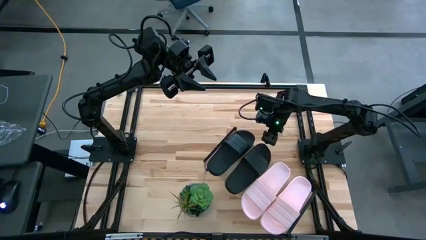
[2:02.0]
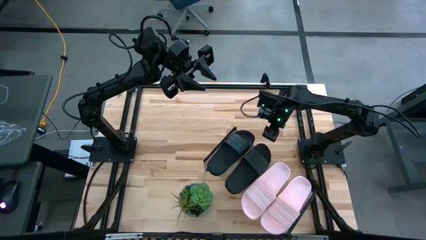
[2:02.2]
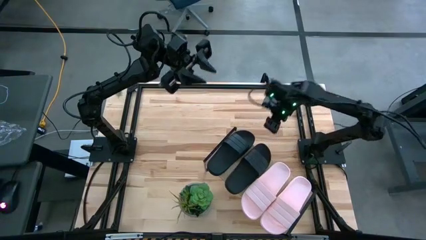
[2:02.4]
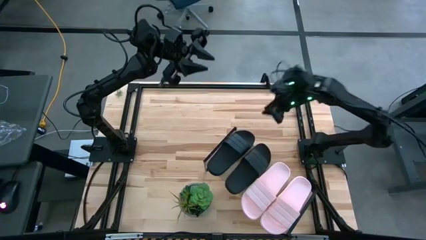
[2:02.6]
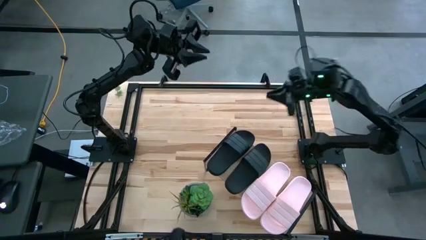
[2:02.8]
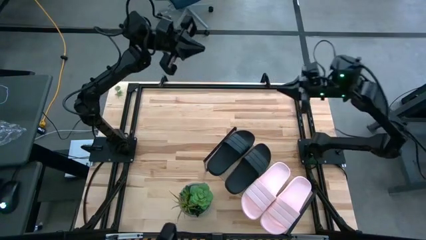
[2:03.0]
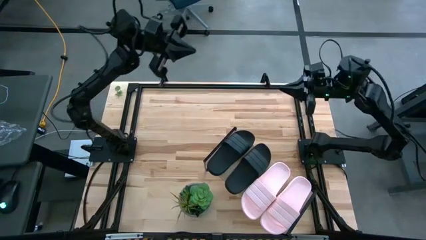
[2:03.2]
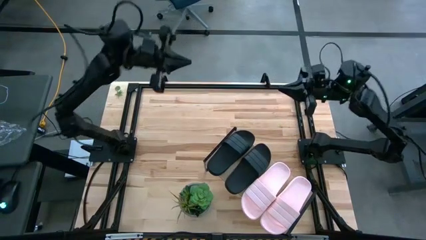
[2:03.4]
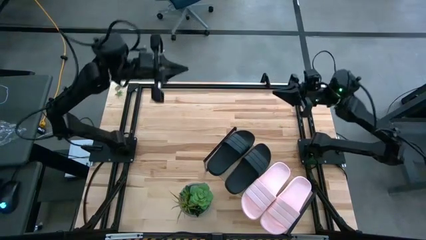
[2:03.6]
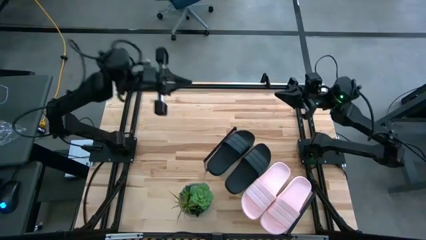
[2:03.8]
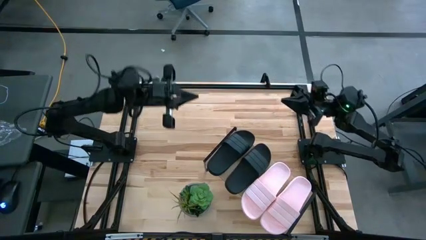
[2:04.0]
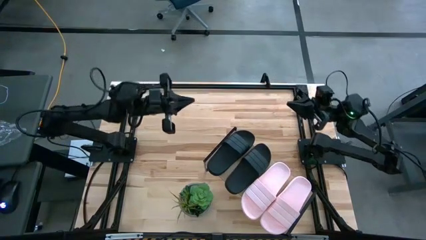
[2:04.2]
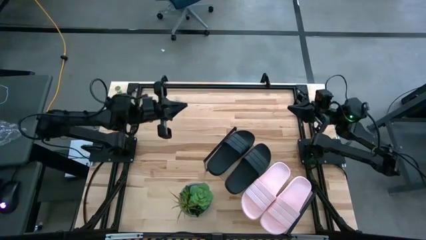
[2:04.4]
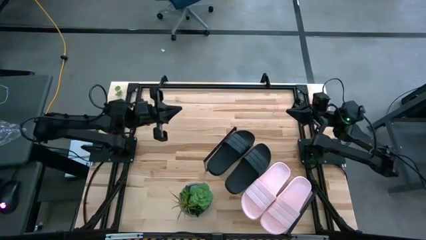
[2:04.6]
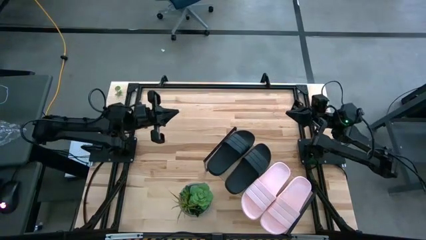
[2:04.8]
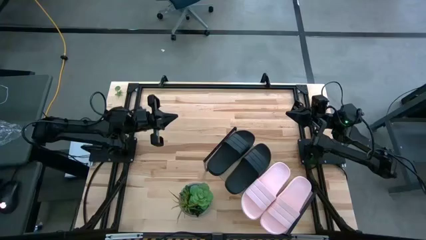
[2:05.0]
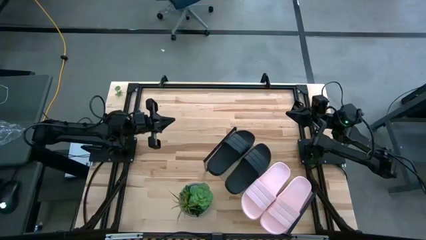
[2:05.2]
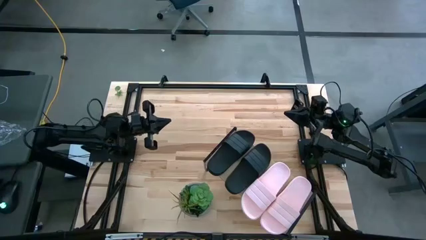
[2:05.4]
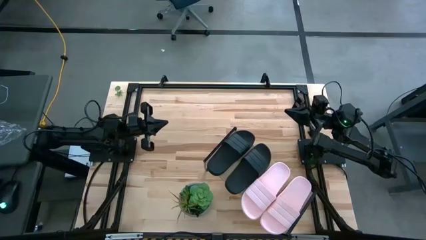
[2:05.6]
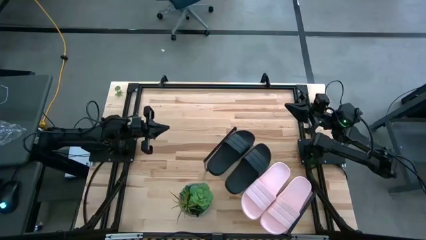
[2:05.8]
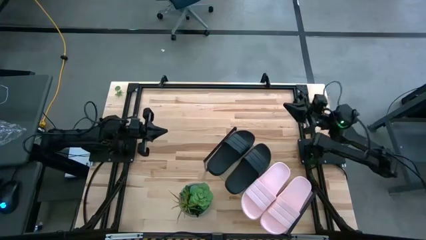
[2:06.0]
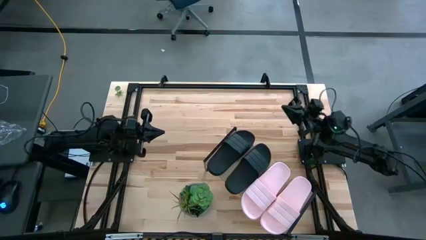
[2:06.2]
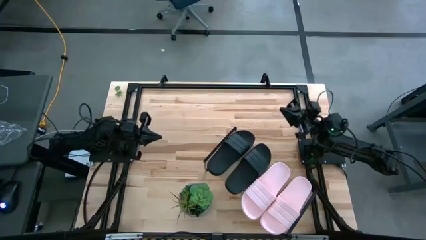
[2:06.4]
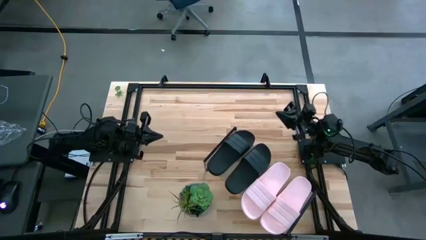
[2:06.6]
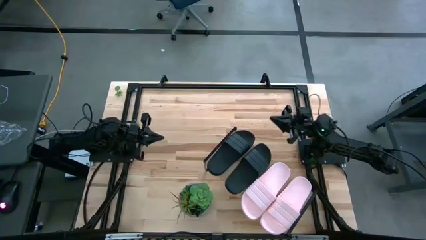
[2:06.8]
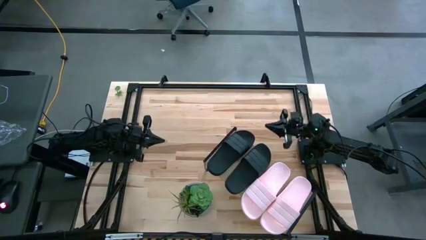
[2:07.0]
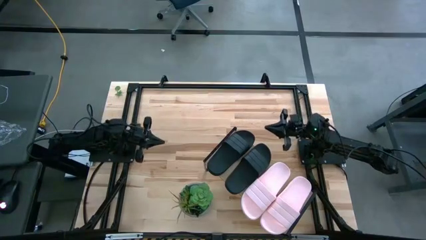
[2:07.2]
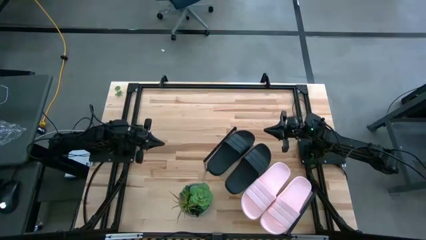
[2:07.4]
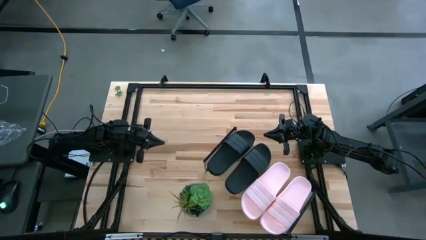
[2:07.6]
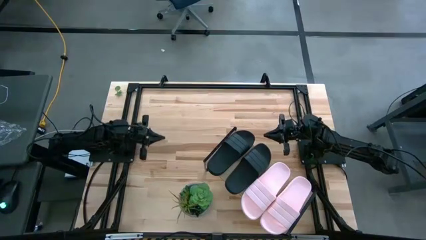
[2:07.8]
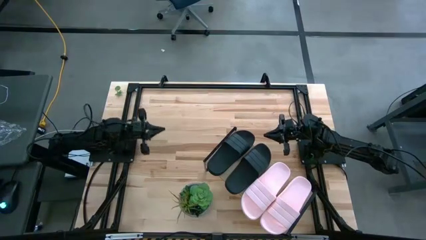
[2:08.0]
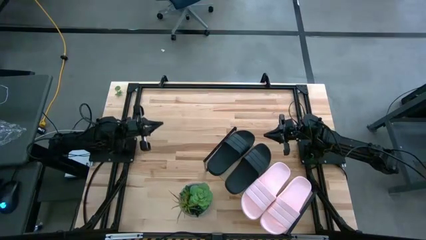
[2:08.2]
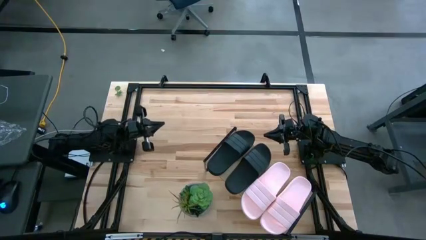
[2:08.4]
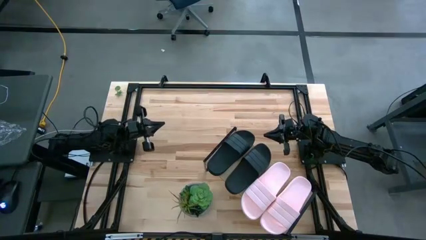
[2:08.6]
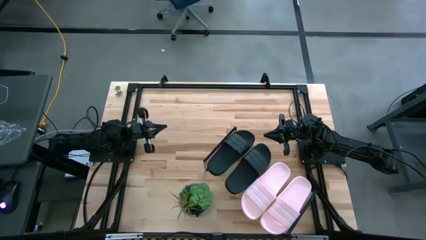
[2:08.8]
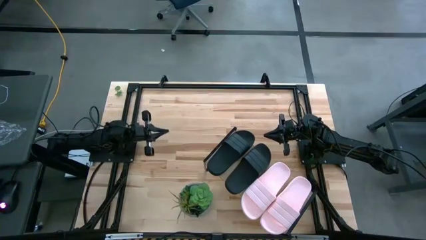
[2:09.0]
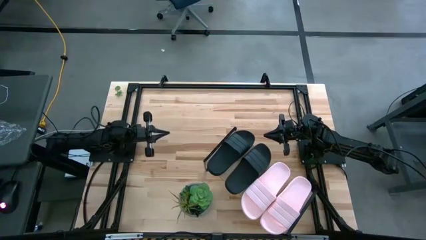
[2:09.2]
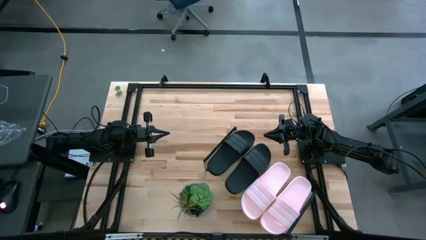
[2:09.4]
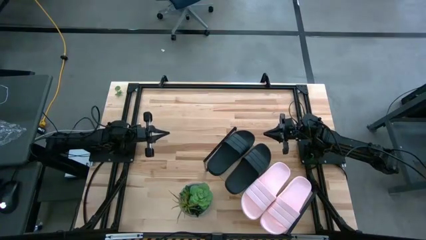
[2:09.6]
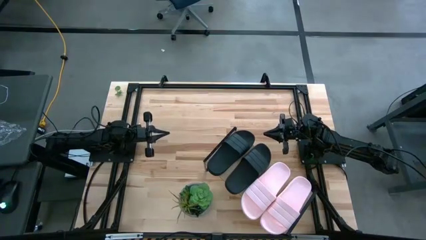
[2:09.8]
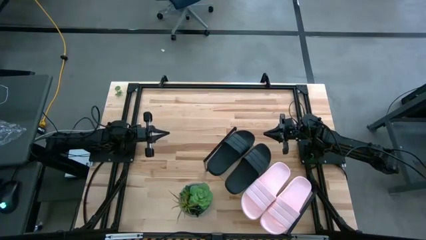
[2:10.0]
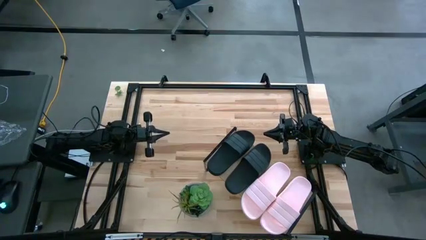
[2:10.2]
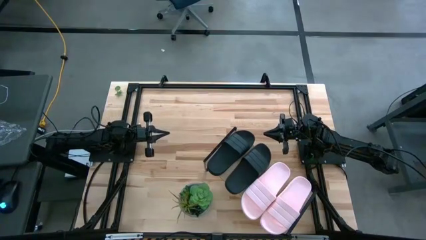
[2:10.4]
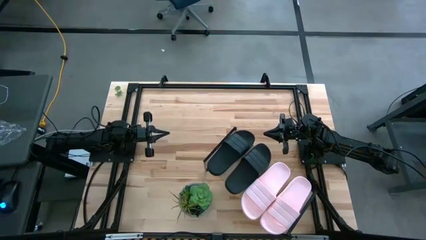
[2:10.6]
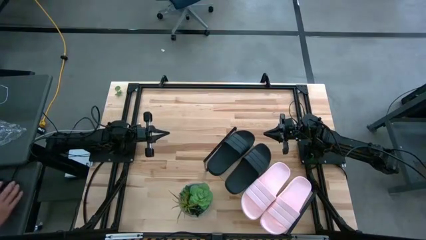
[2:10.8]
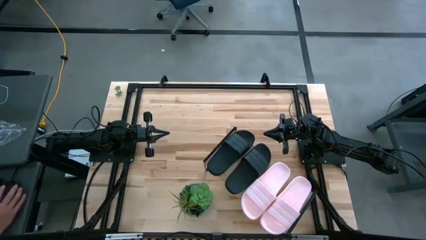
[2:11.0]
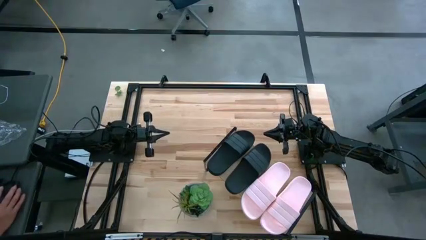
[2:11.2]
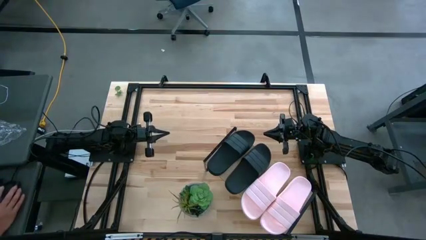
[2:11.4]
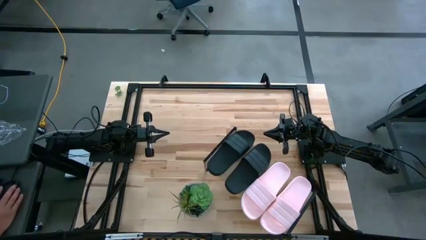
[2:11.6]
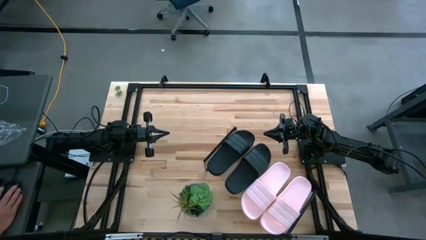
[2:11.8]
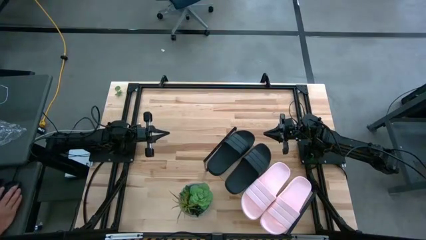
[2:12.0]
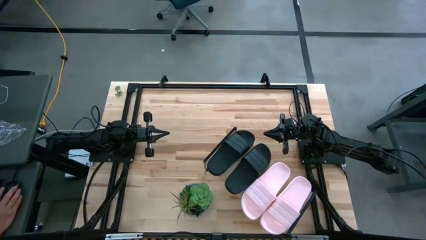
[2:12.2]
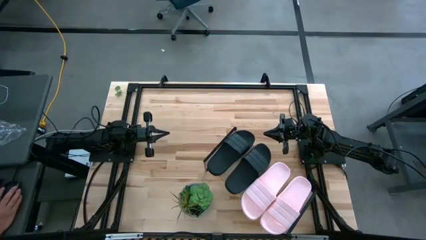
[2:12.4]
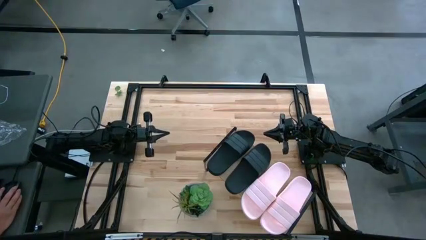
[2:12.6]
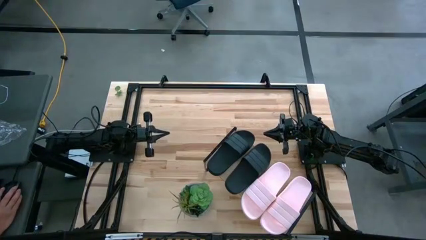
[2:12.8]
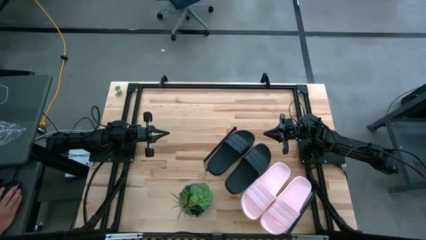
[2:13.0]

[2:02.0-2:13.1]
Task: Pick and place slides into the shelf
Return to Home Position

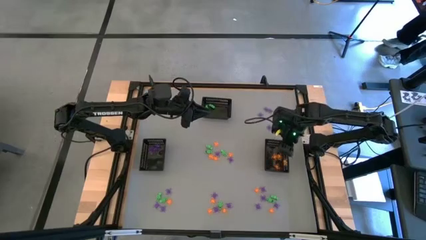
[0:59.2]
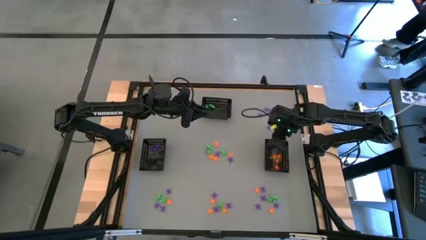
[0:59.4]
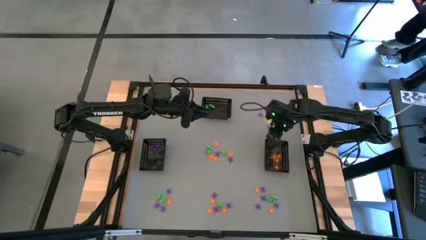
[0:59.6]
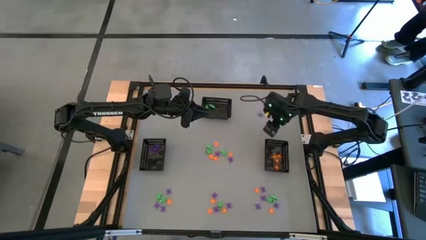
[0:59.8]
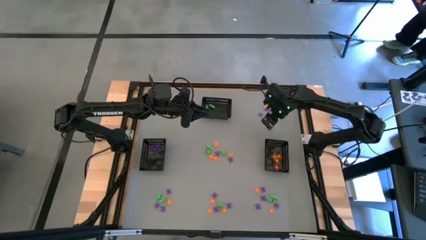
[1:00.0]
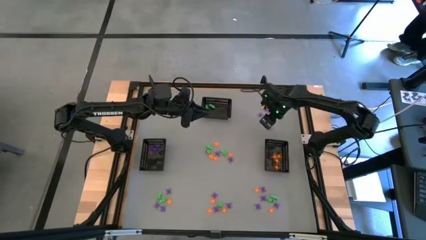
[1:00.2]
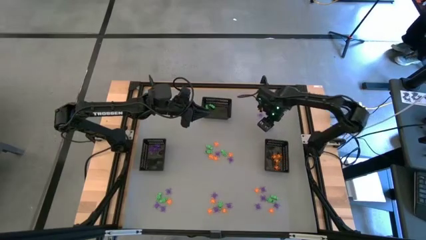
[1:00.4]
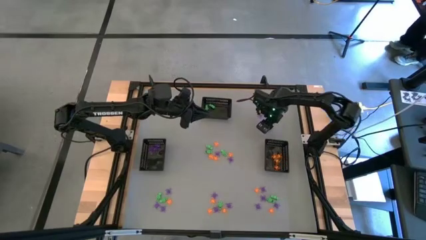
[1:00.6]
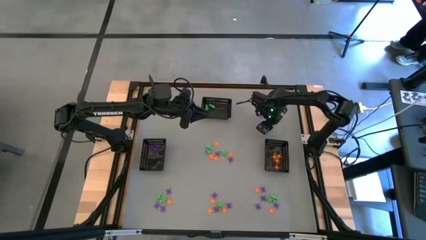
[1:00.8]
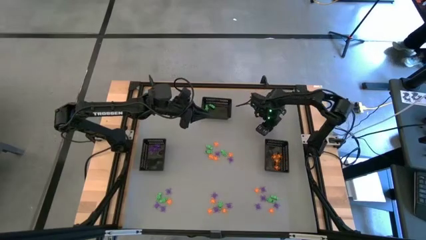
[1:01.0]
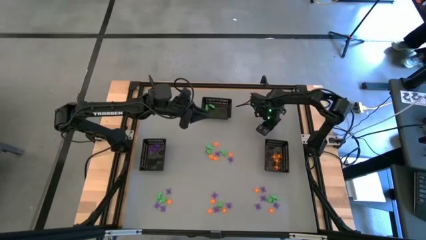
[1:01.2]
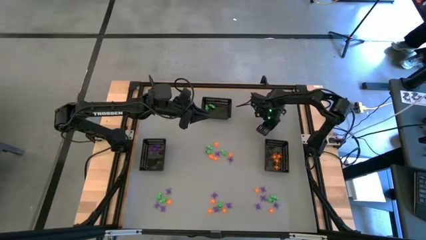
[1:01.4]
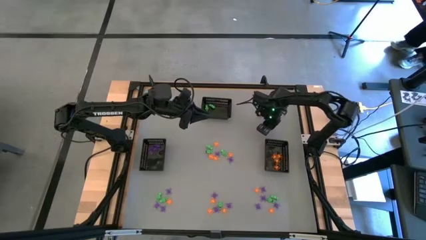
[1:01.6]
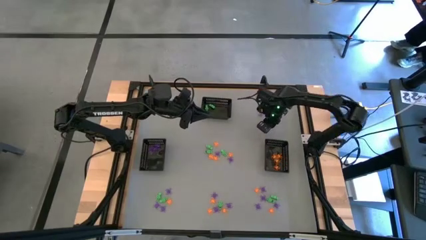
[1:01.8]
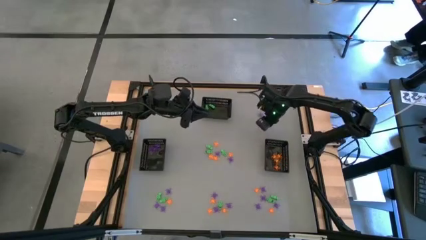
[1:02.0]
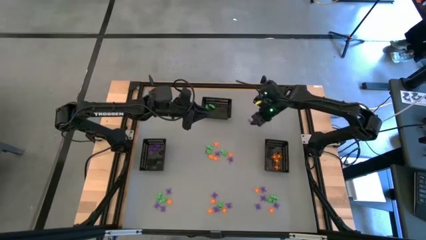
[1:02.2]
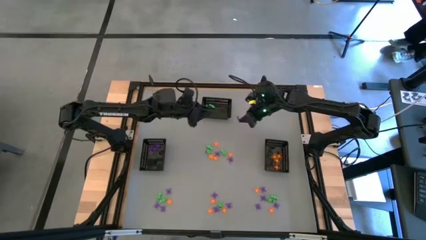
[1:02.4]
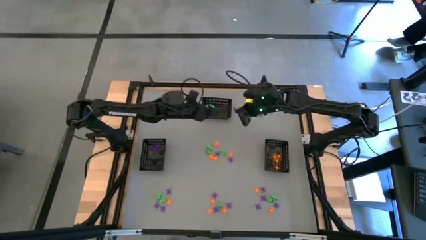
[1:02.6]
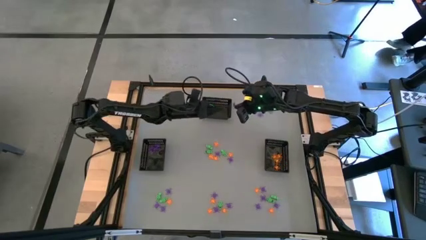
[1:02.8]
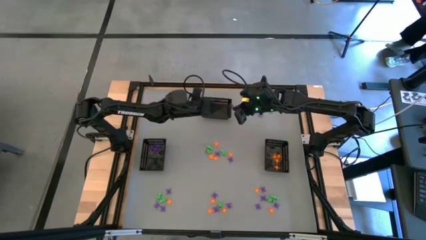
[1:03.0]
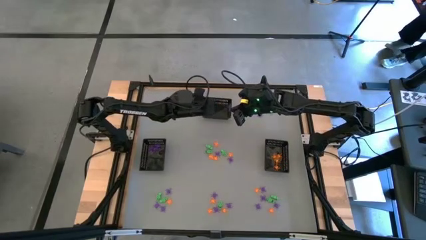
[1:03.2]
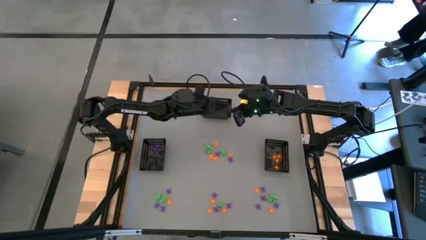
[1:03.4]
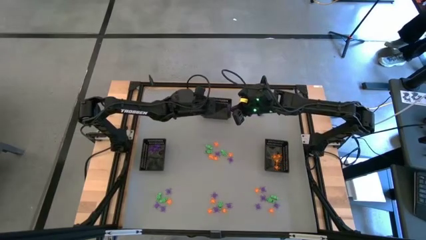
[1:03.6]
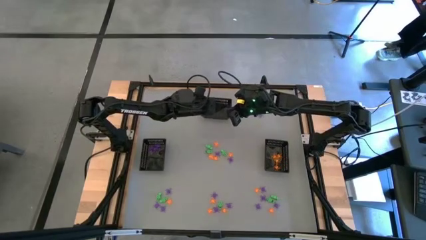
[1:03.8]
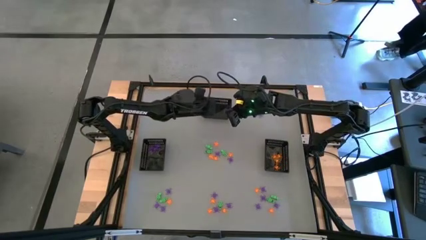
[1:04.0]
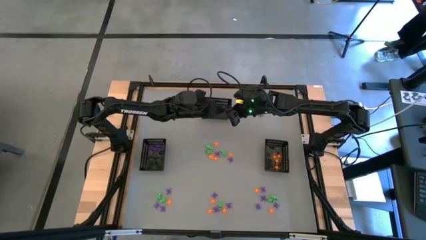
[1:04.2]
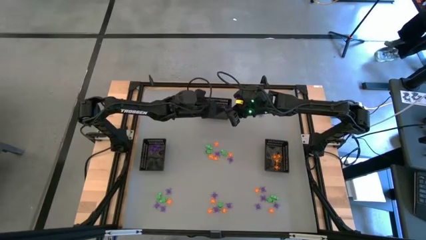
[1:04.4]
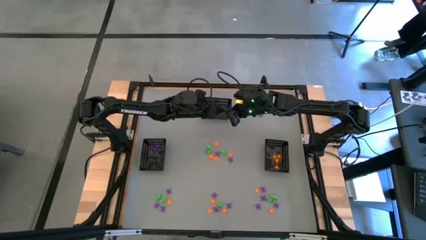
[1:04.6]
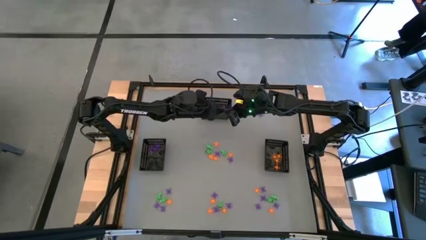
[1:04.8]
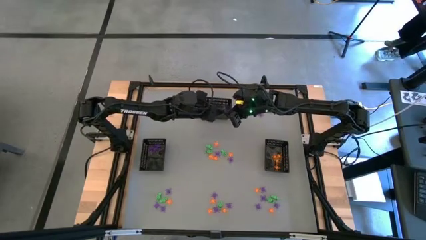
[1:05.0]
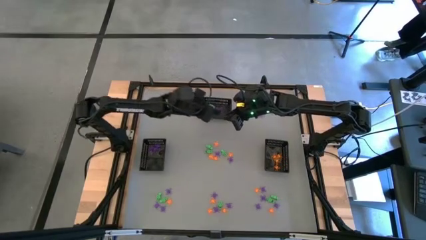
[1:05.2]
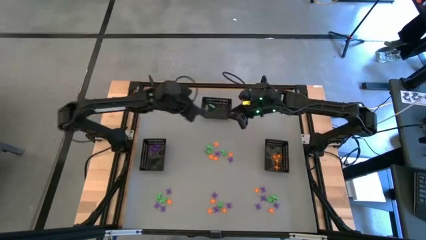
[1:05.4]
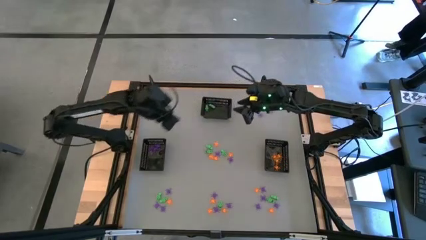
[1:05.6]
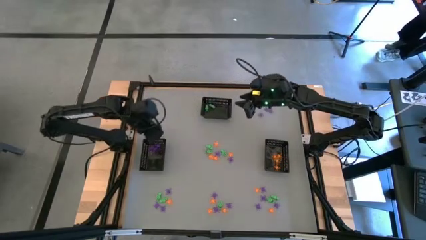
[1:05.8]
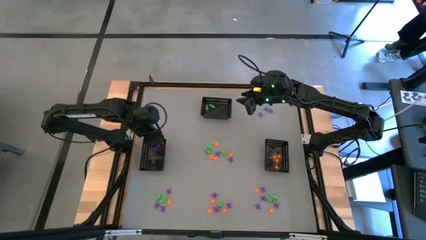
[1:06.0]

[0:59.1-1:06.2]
Task: Sort Halloween decoration
Put the violet spider toy into the left bin
